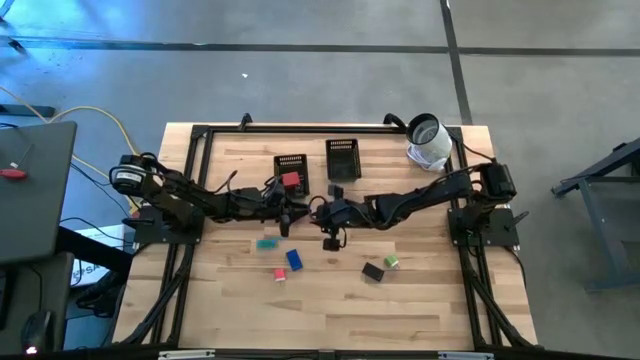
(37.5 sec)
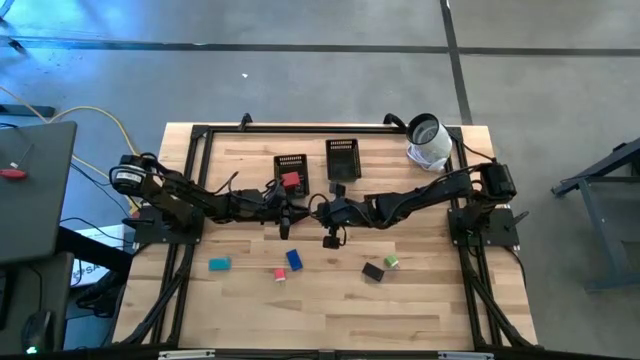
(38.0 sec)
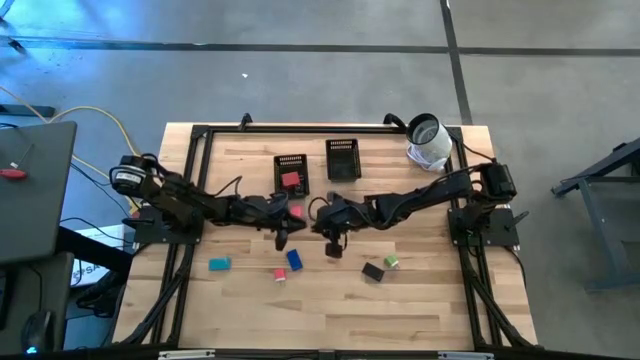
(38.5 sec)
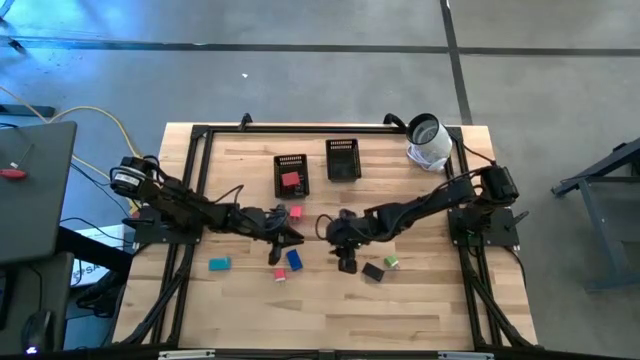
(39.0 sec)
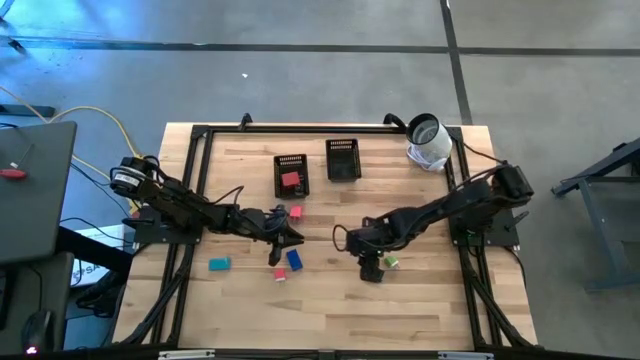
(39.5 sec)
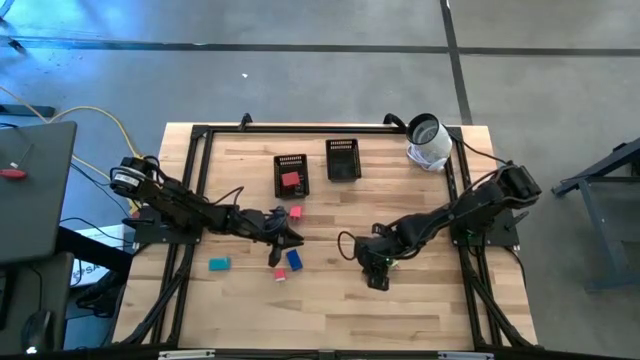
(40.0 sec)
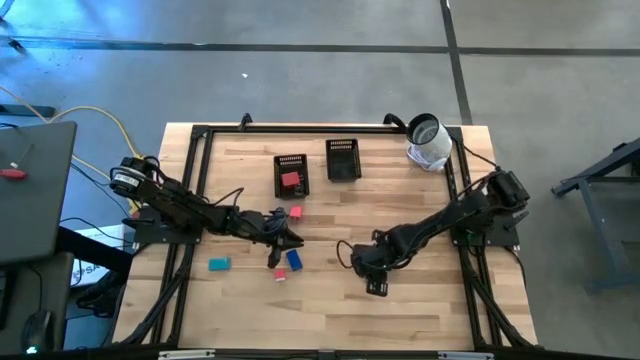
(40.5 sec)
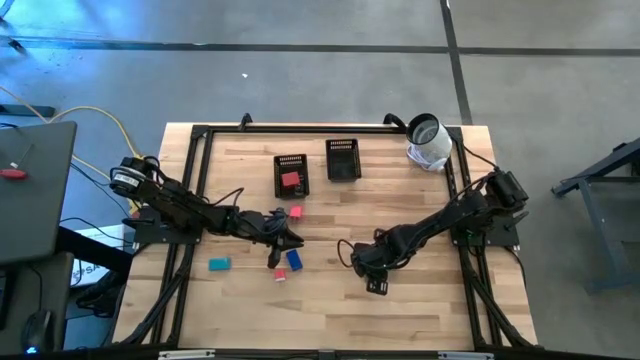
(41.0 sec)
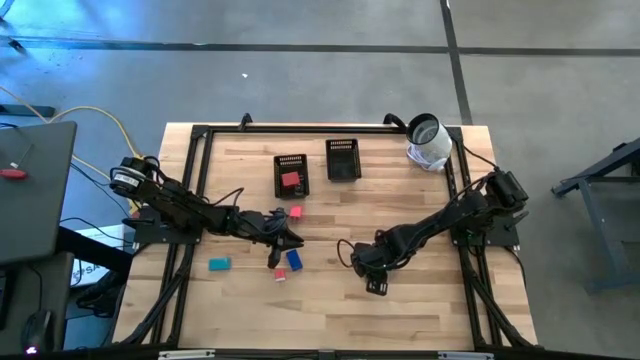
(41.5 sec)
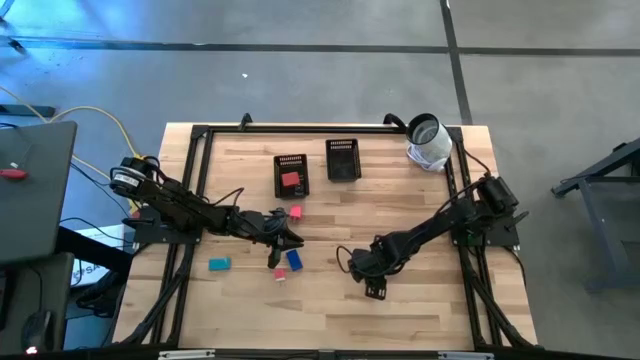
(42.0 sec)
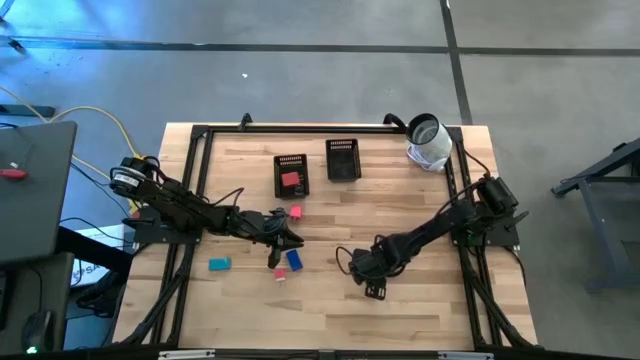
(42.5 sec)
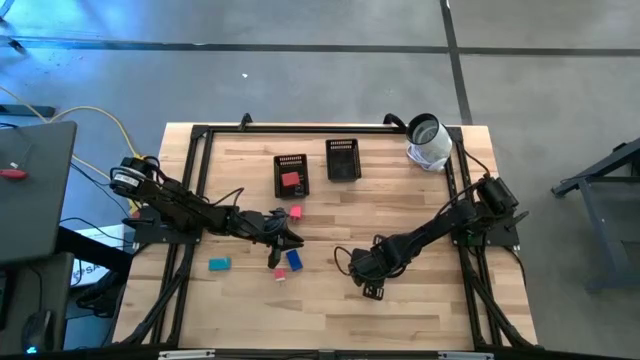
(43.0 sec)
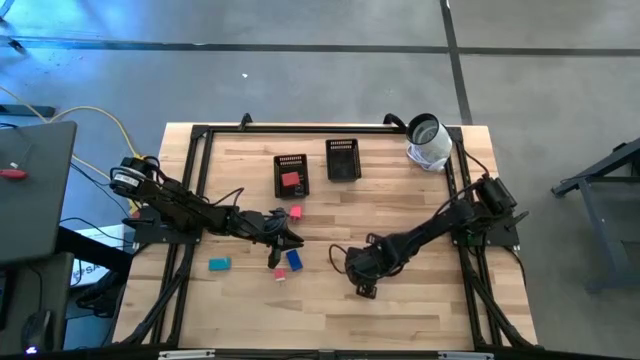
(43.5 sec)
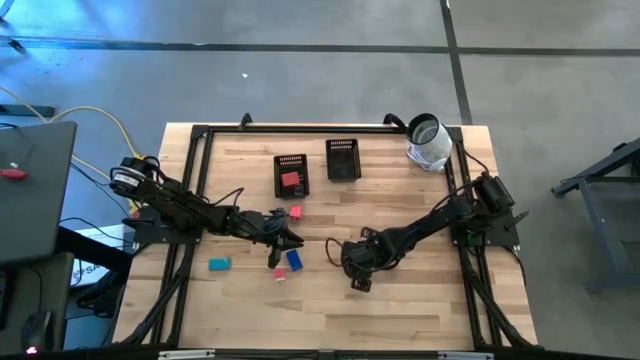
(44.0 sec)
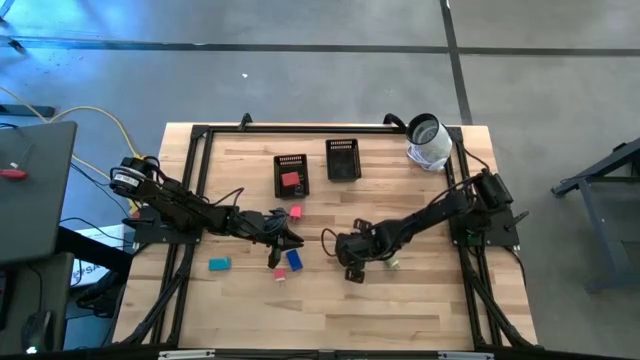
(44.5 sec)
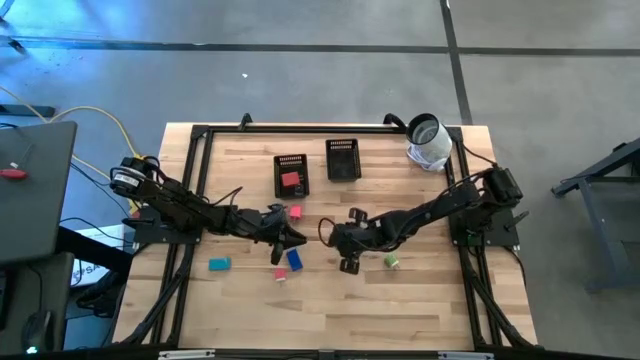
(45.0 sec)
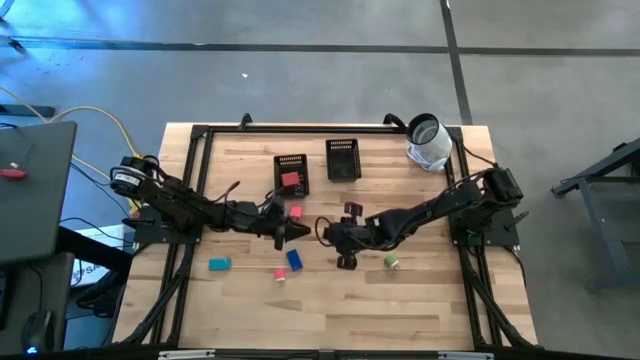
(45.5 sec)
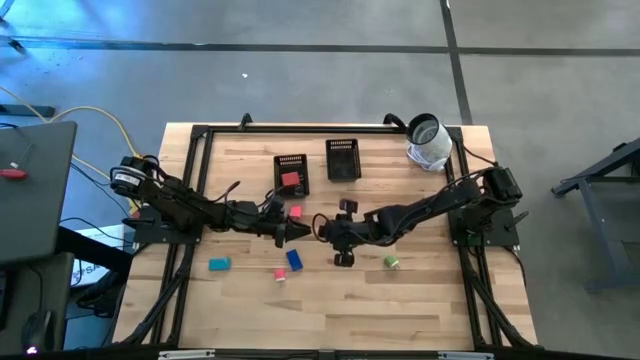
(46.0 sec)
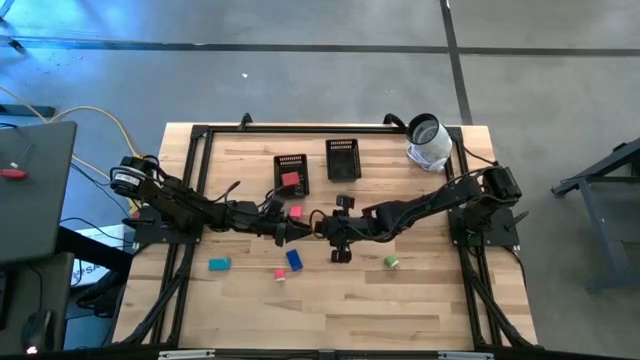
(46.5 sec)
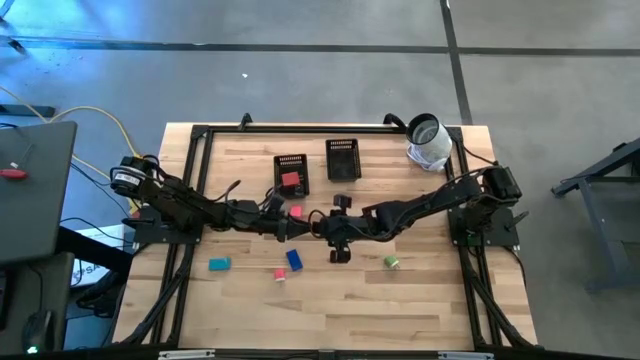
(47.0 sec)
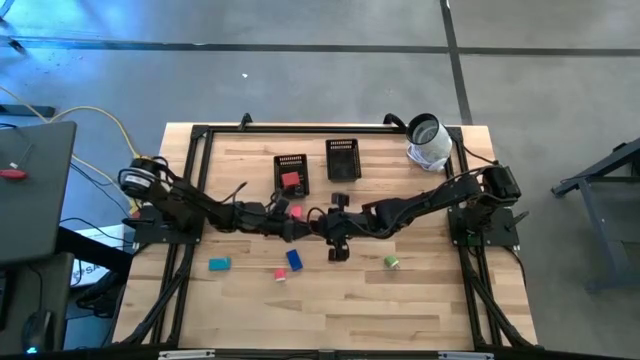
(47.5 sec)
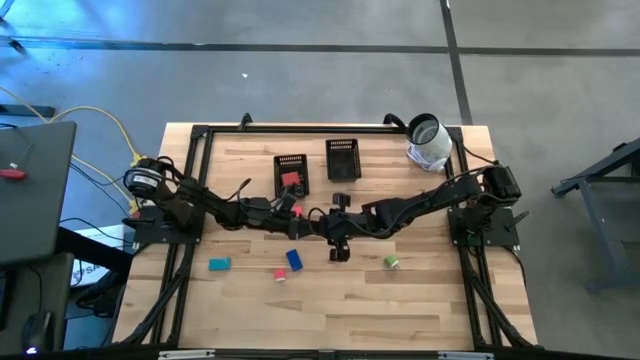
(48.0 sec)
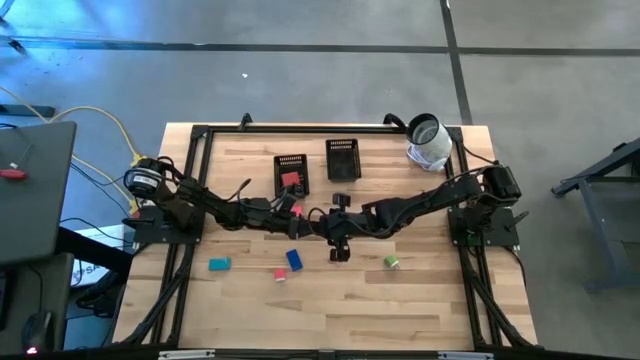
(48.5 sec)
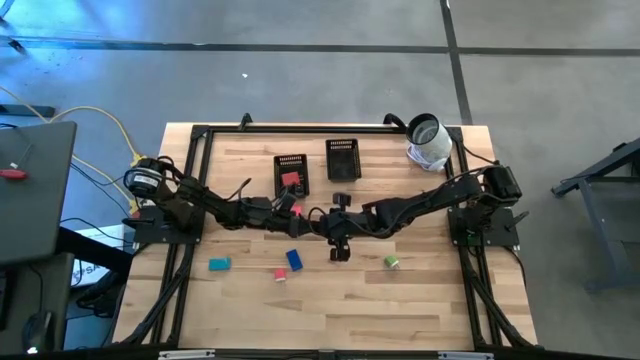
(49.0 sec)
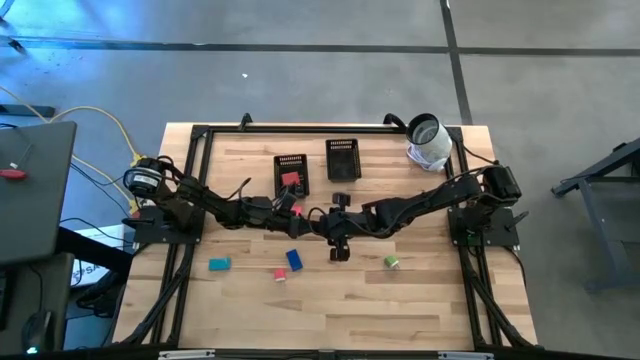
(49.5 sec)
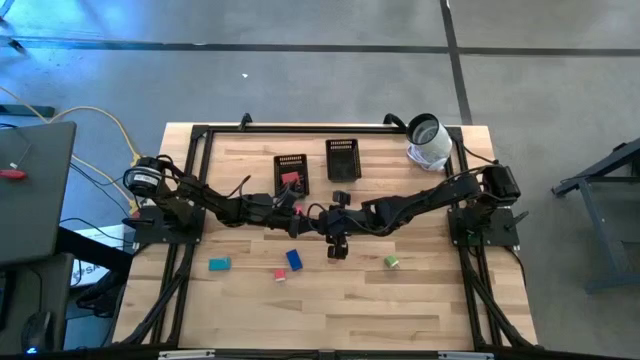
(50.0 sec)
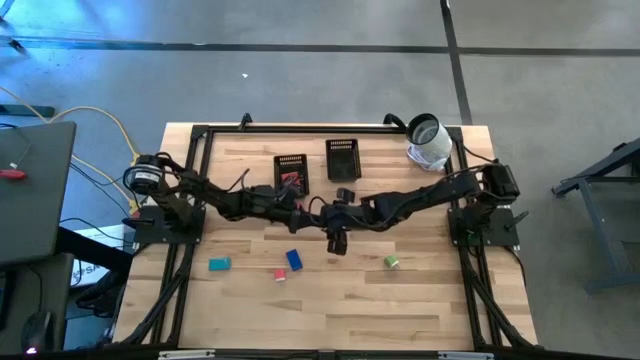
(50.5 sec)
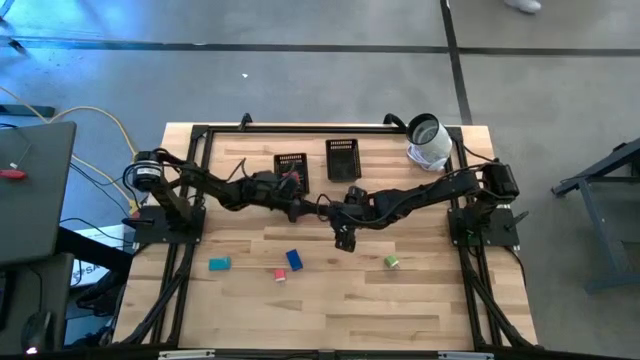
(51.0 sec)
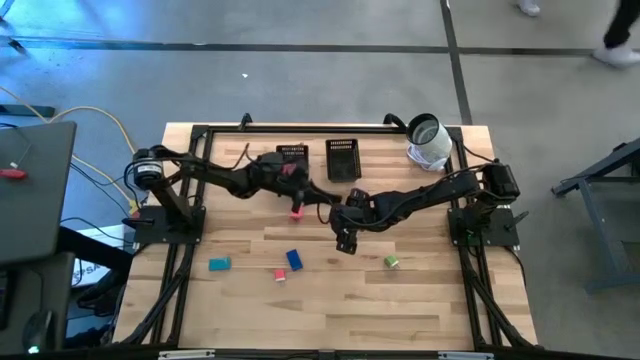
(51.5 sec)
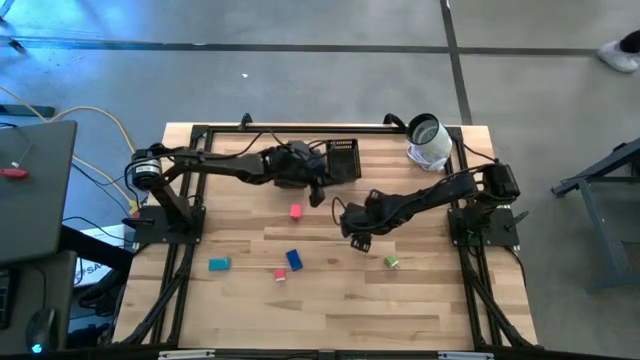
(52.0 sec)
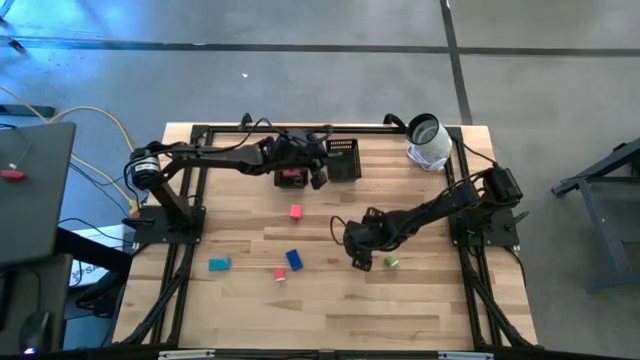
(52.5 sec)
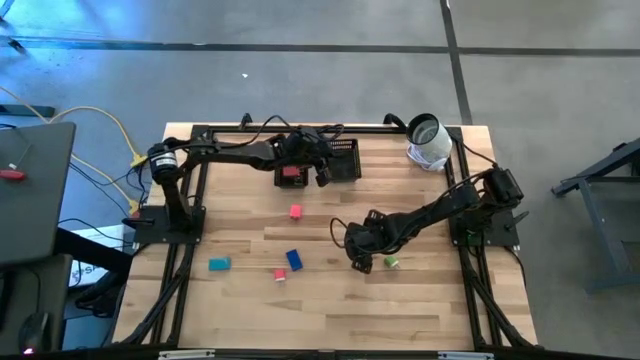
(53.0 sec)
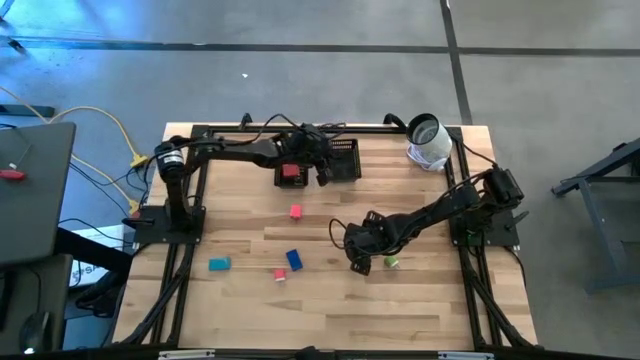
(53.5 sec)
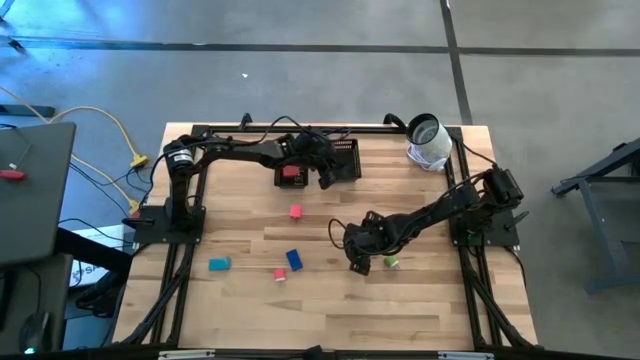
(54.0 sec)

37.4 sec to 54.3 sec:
Task: Pick & Place Office items
Put the black digital clock into the right black bin

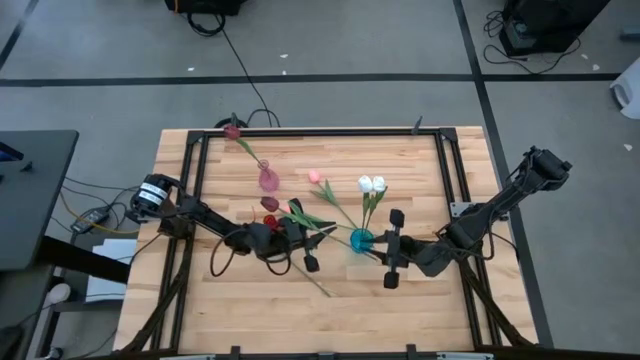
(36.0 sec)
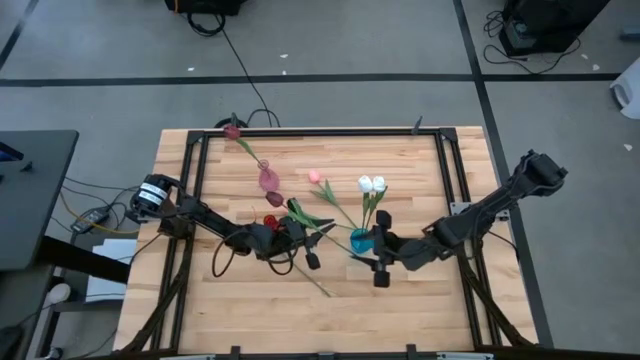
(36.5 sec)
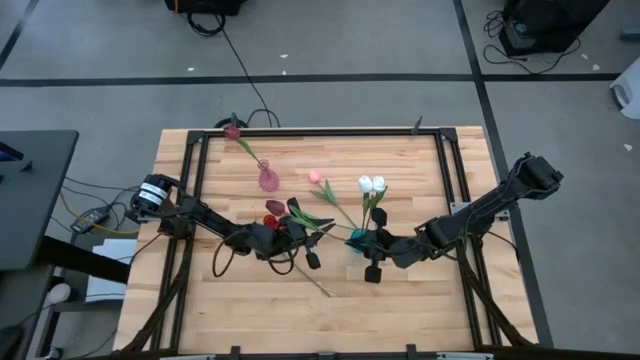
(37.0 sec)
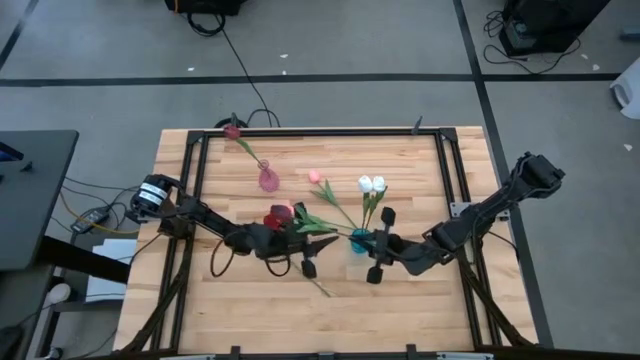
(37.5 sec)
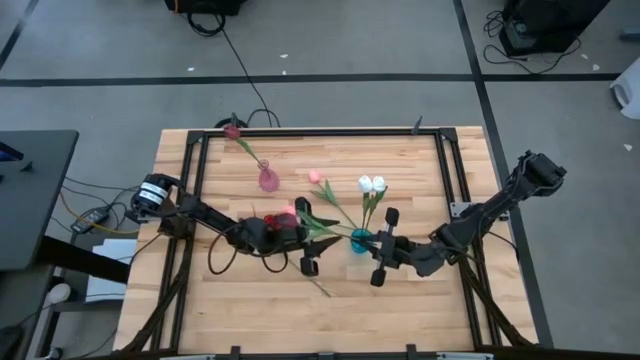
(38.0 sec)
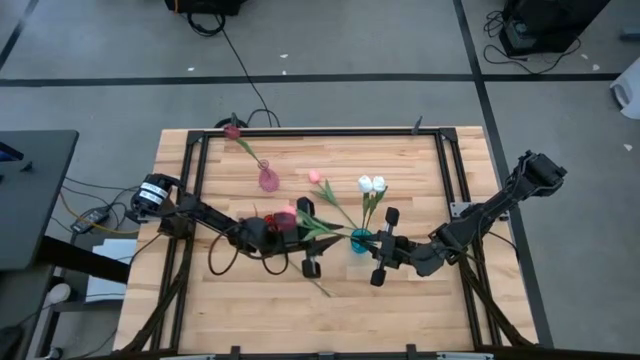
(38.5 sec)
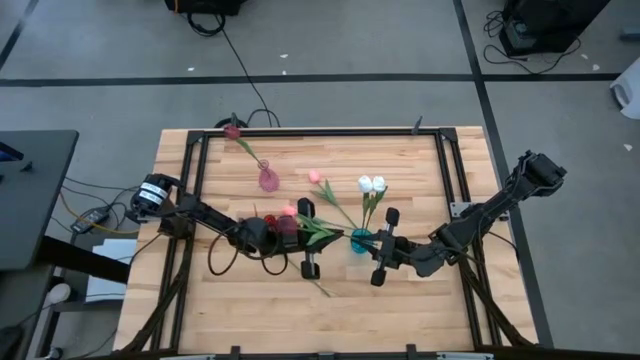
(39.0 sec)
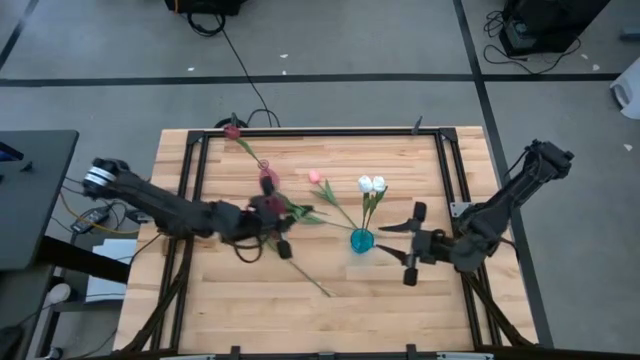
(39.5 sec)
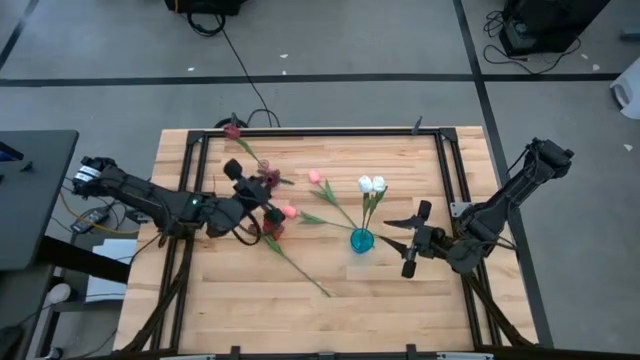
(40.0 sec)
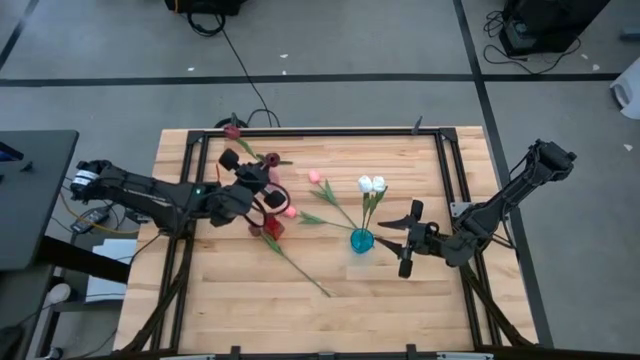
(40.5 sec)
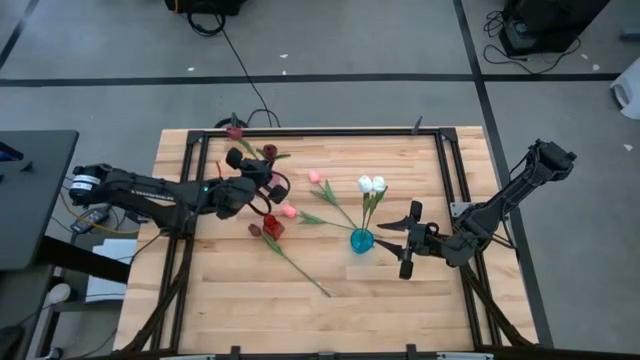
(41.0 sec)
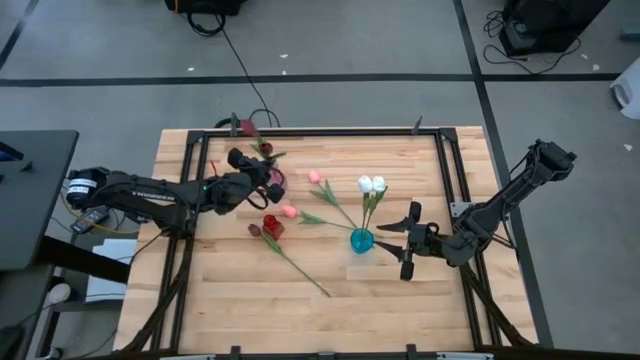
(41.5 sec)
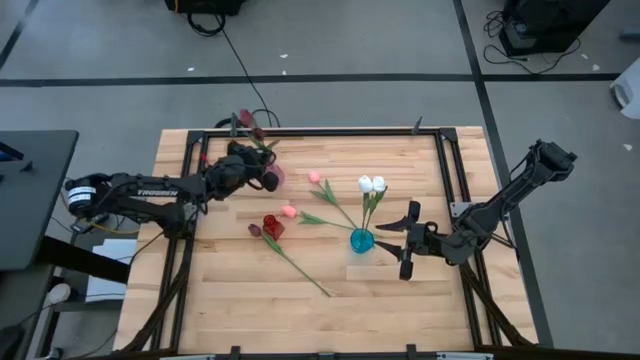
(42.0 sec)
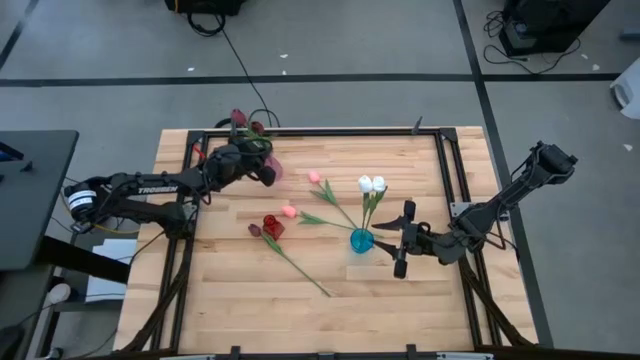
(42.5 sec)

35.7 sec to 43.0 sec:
Task: Sort flowers into vase by color
Put the bottom red tulip into the pink vase
